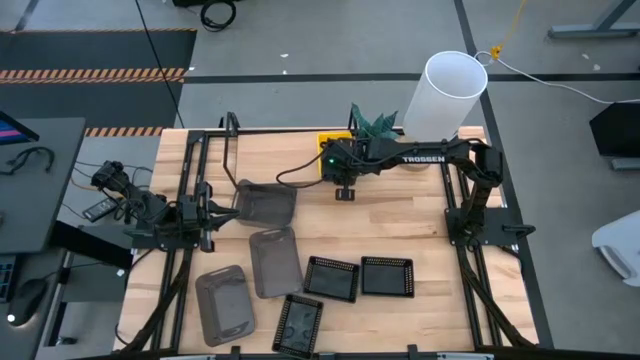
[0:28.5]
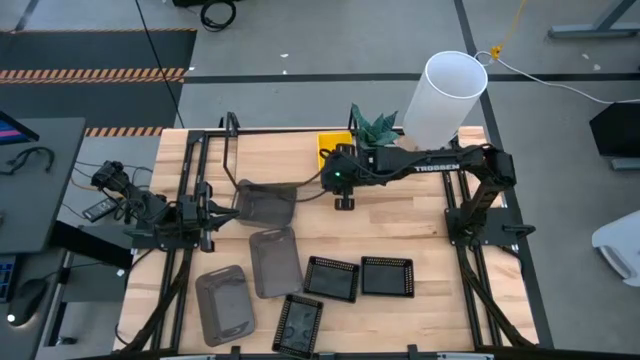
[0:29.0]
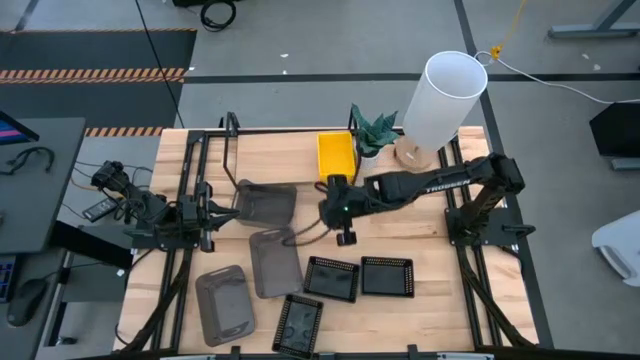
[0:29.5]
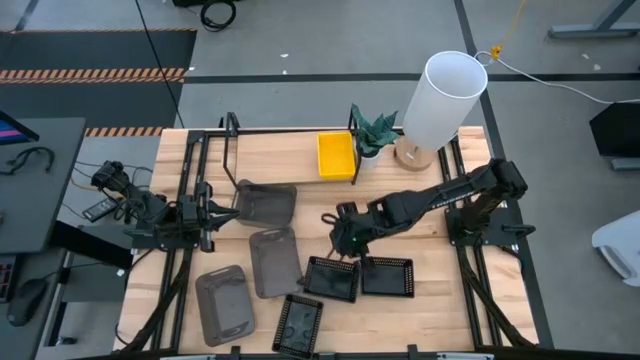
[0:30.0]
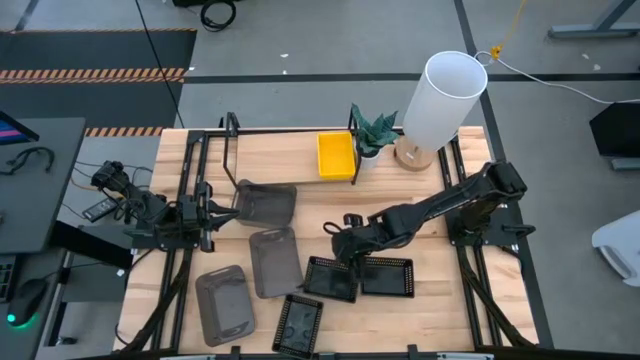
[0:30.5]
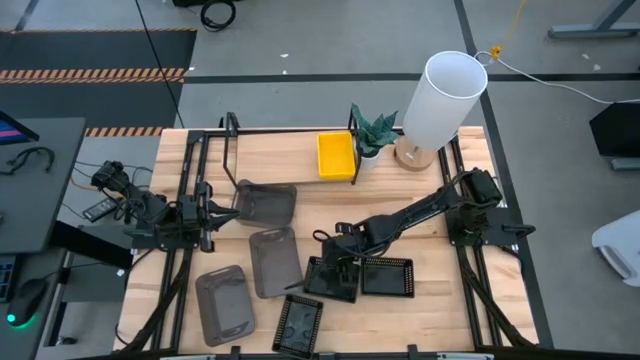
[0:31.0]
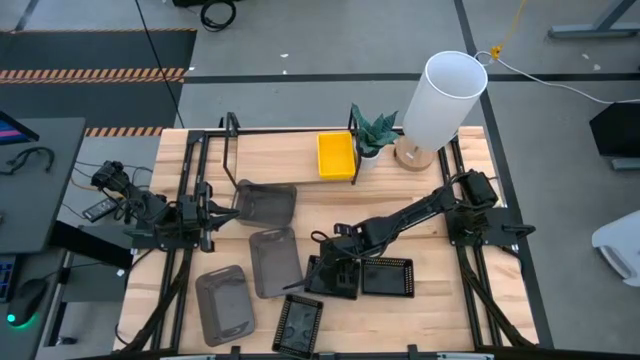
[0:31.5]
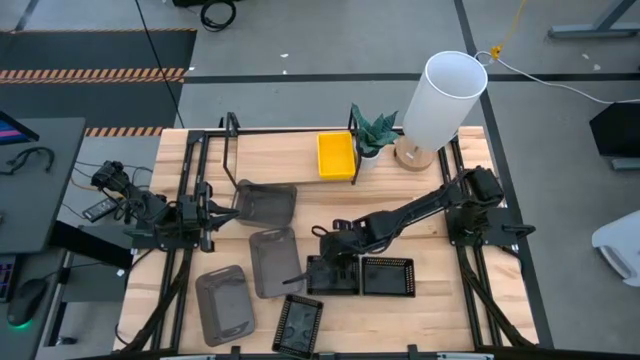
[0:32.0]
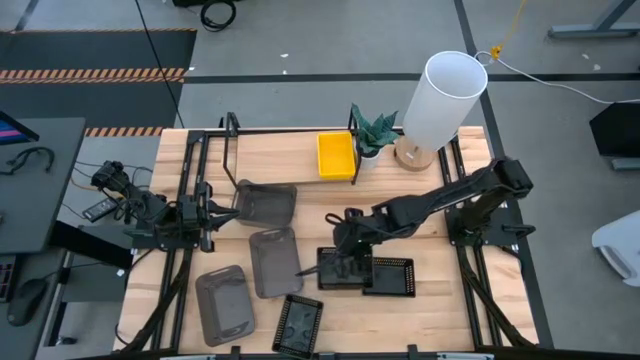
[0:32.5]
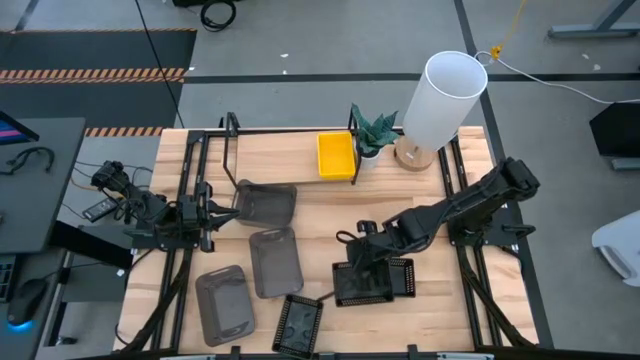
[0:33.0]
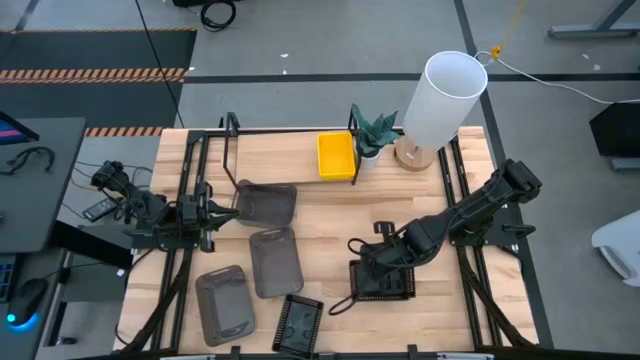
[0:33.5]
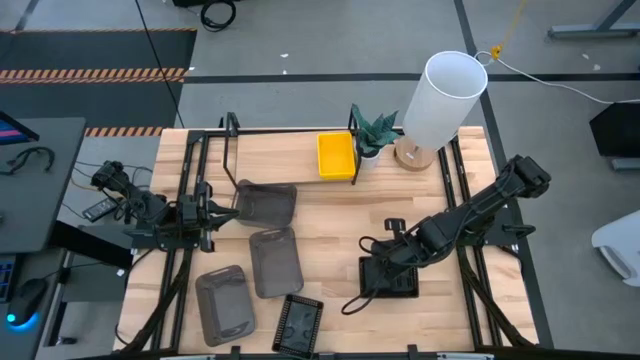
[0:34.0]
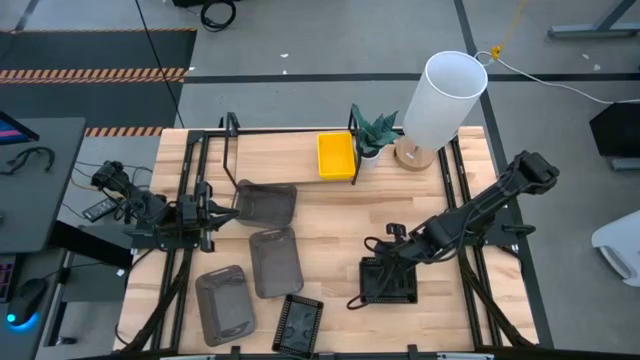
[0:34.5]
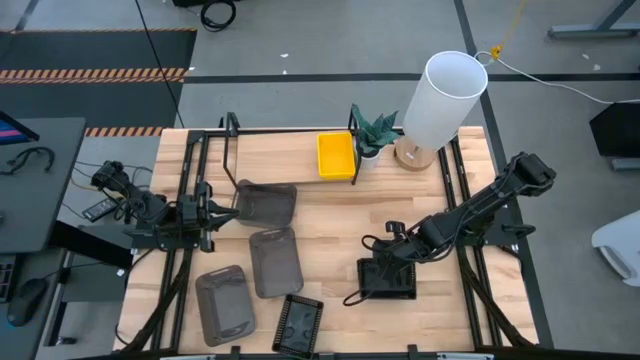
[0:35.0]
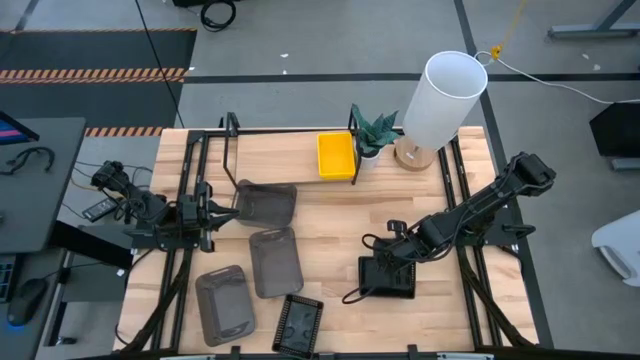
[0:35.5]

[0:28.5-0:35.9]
Task: Stack baskets on shelf by color
Stack the top left black basket on top of the top right black basket

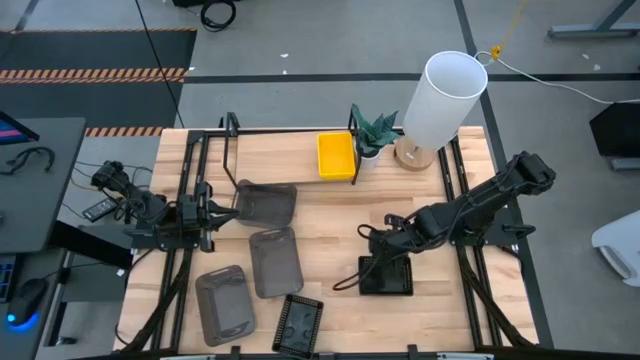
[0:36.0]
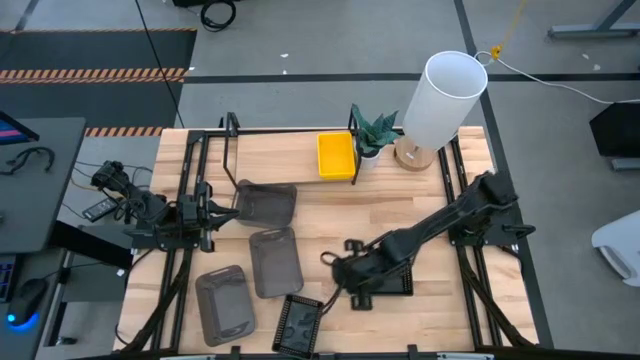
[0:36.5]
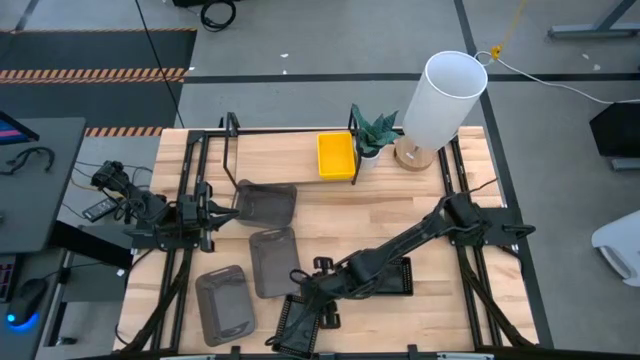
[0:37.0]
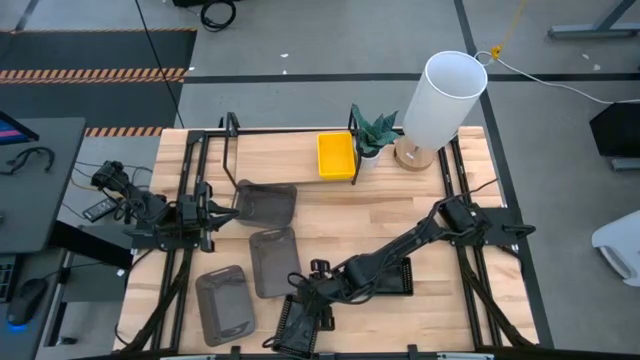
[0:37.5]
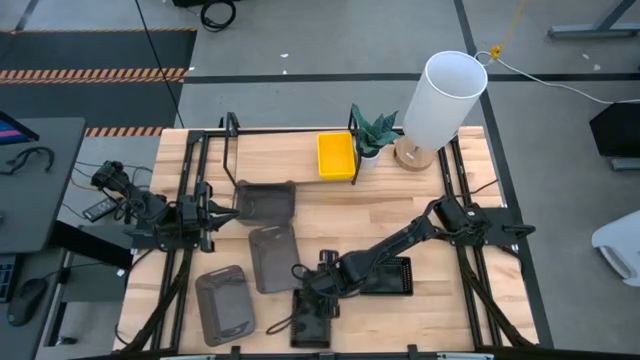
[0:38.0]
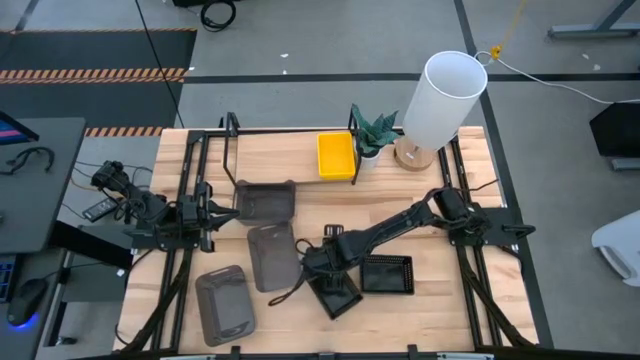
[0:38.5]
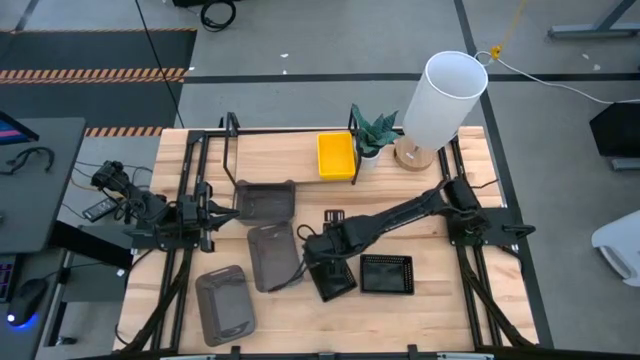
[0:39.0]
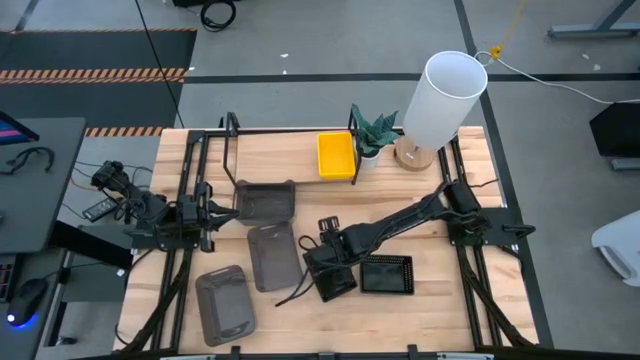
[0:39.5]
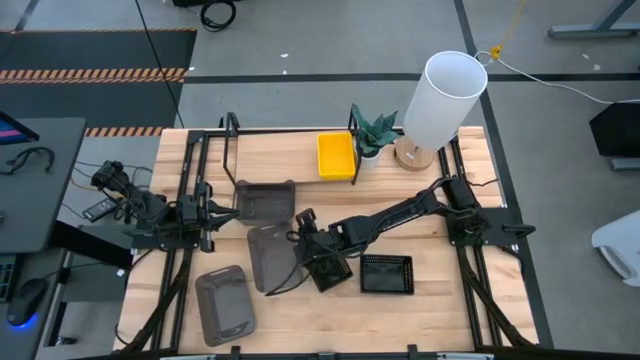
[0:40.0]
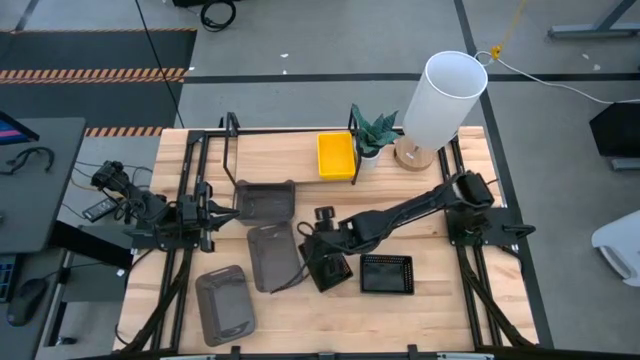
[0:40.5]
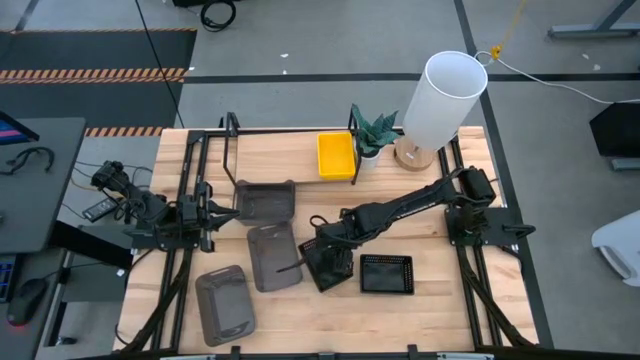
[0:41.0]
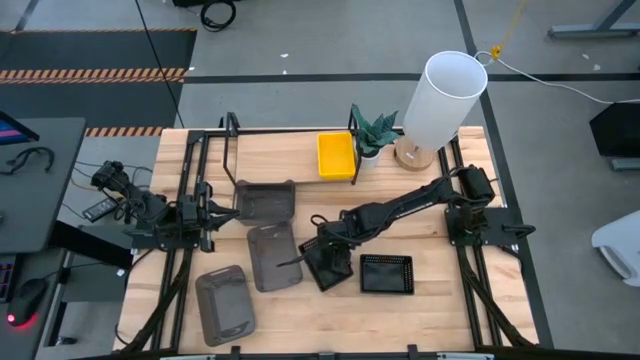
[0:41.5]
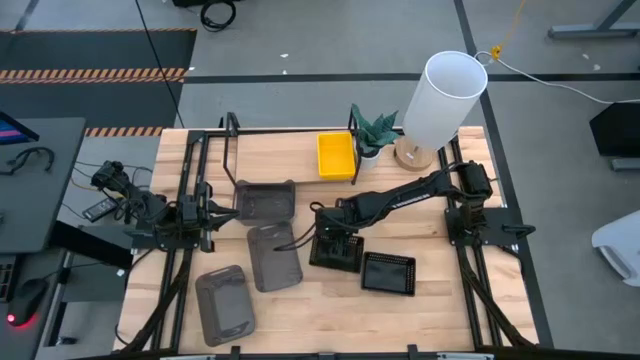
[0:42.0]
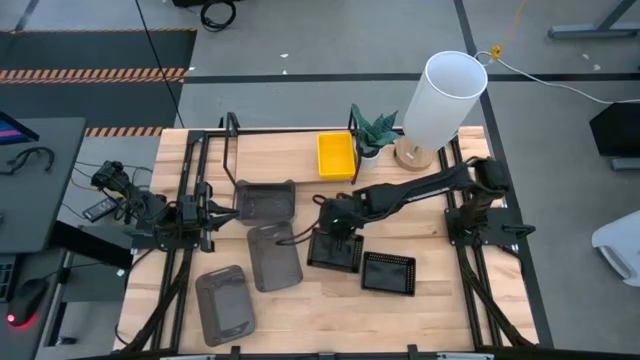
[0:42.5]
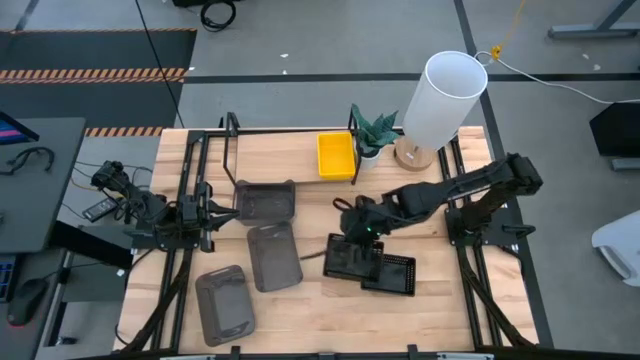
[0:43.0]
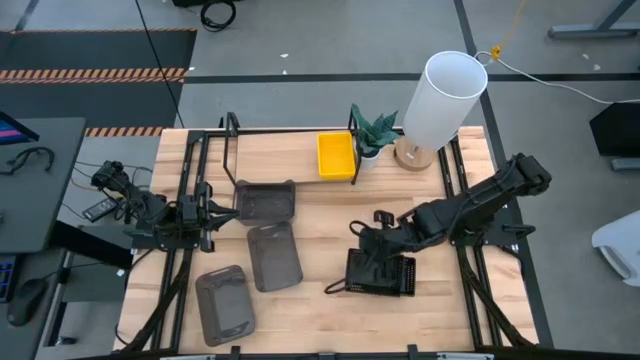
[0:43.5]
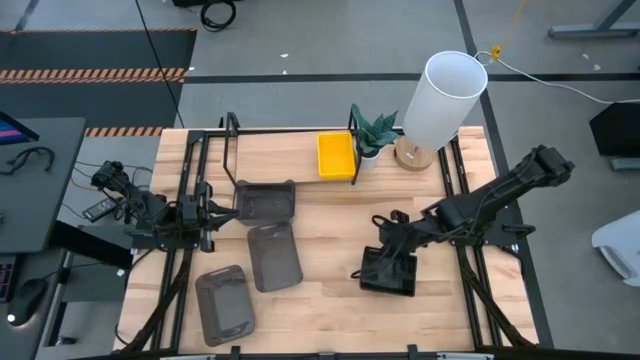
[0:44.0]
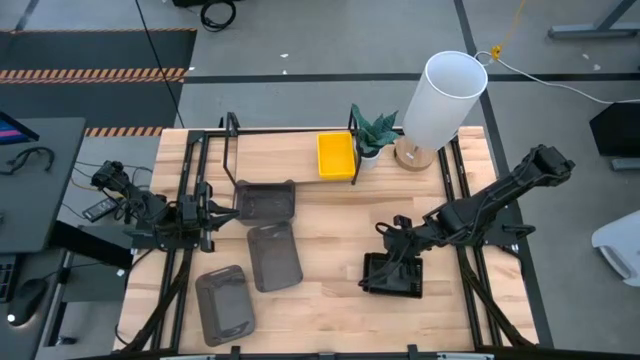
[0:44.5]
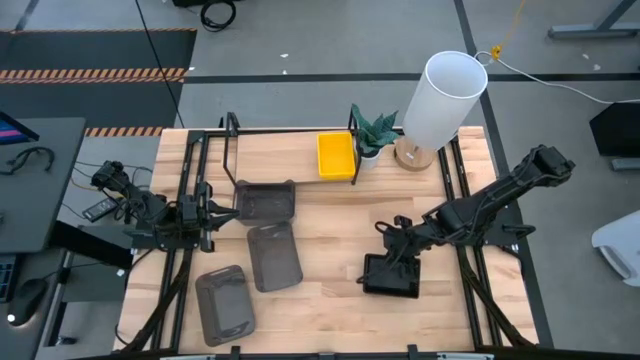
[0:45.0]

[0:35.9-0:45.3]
Stack the bottom black basket on top of the top black basket

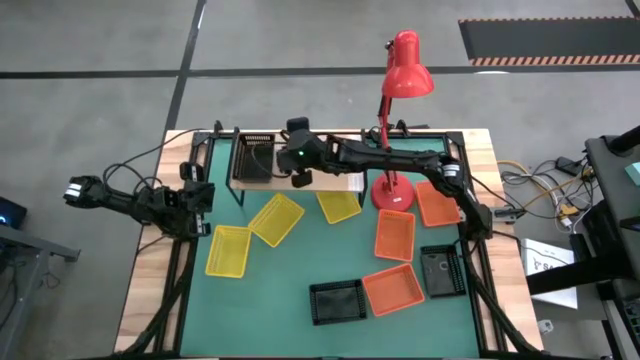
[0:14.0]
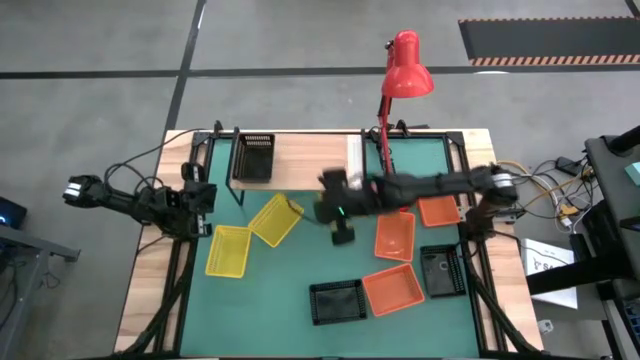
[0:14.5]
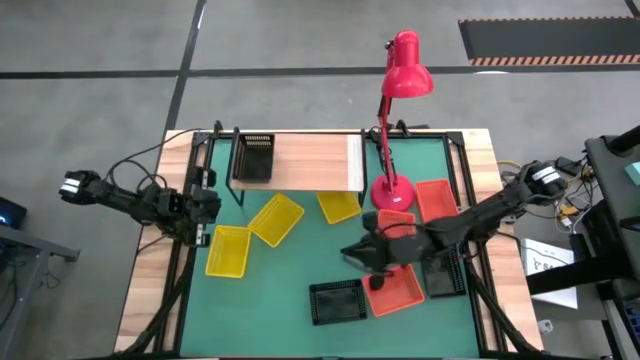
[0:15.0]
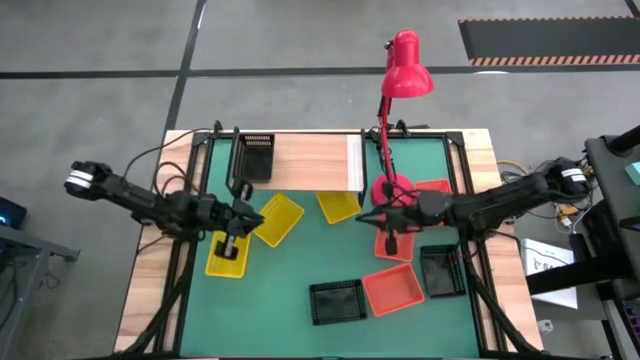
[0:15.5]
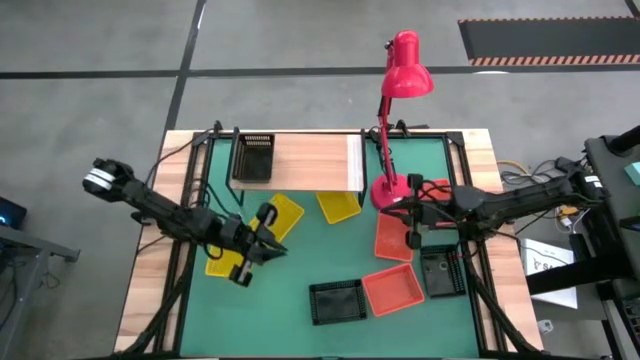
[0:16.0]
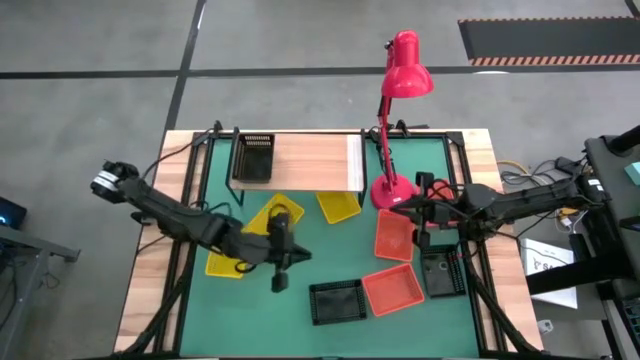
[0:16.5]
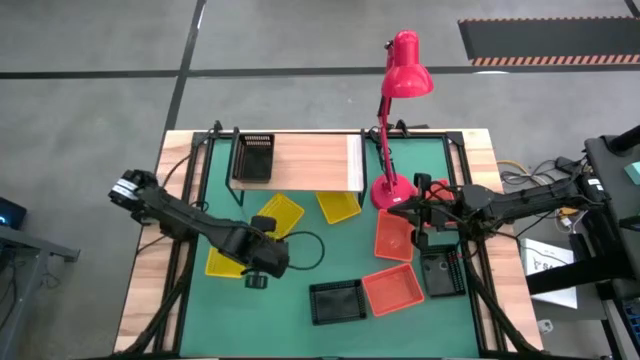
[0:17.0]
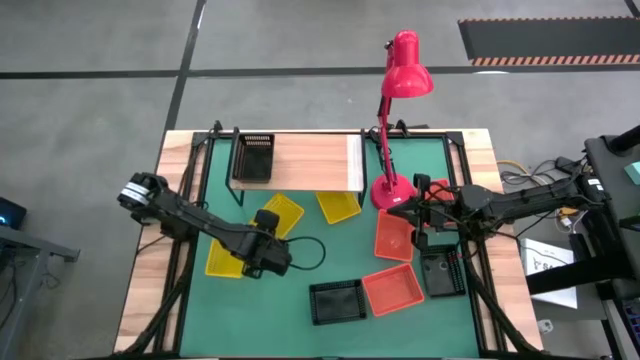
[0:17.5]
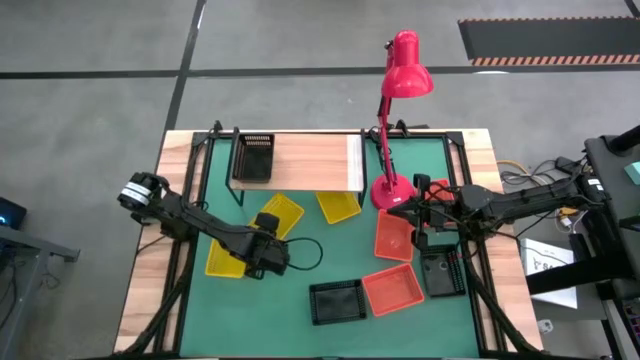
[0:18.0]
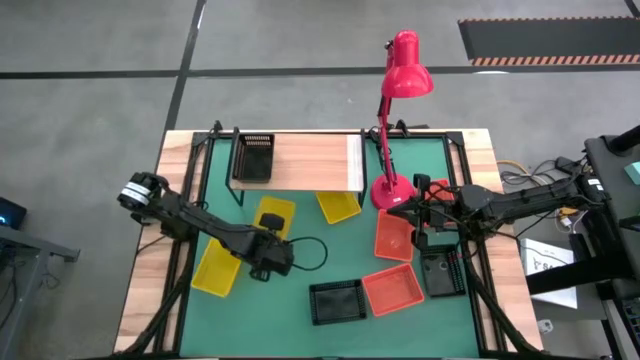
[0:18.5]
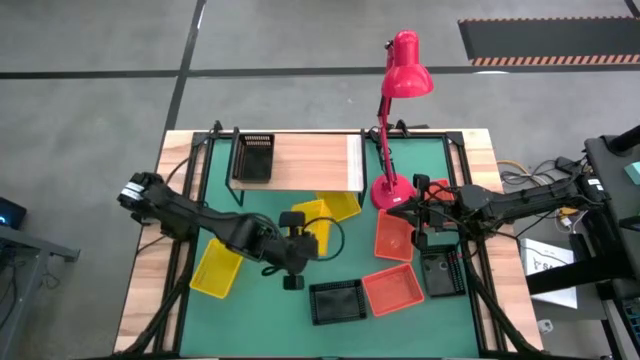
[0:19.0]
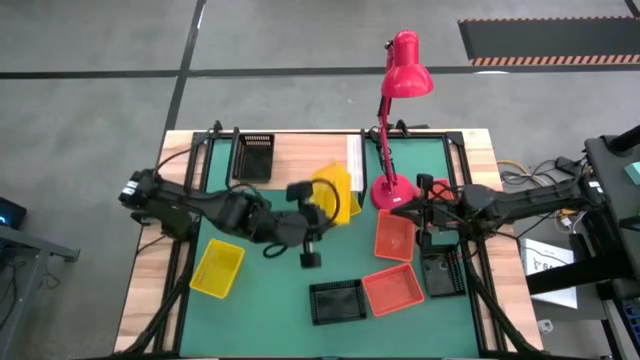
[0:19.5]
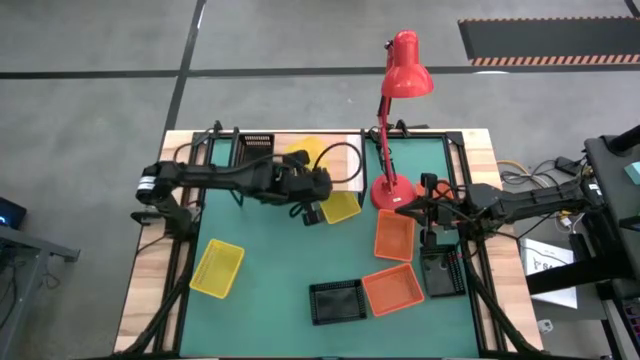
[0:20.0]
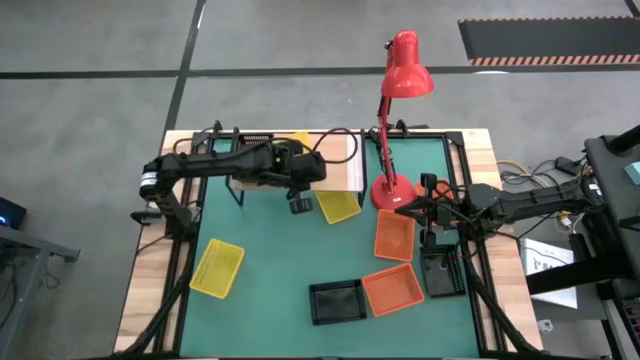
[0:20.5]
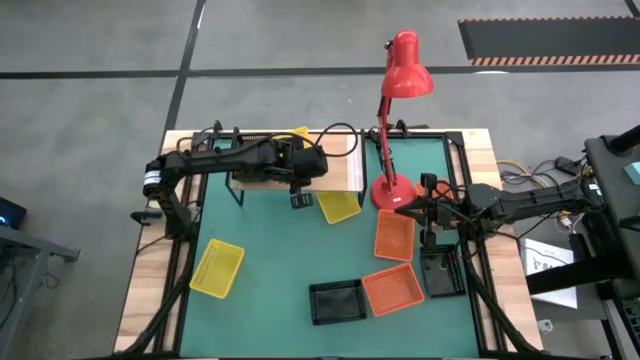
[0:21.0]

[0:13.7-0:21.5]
Task: Stack baskets on shelf by color
Put the middle yellow bin on the shelf
